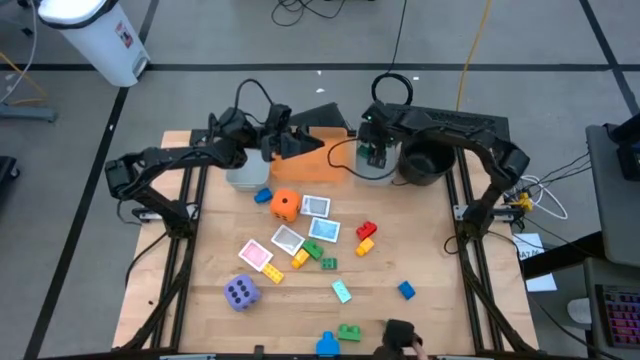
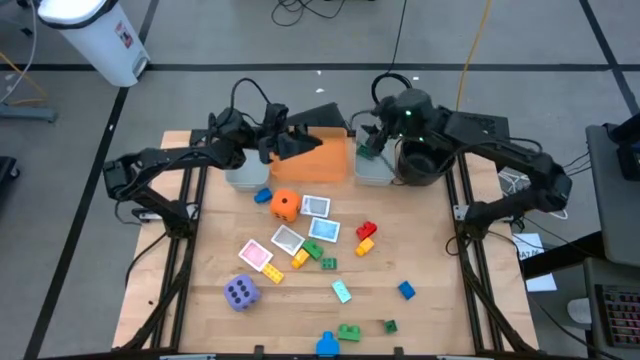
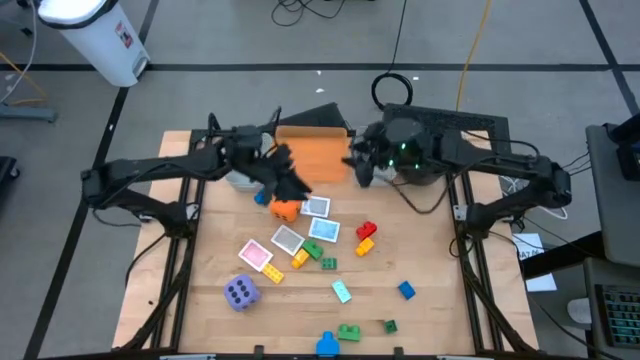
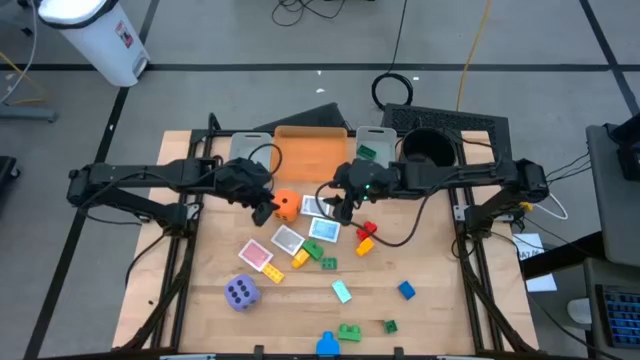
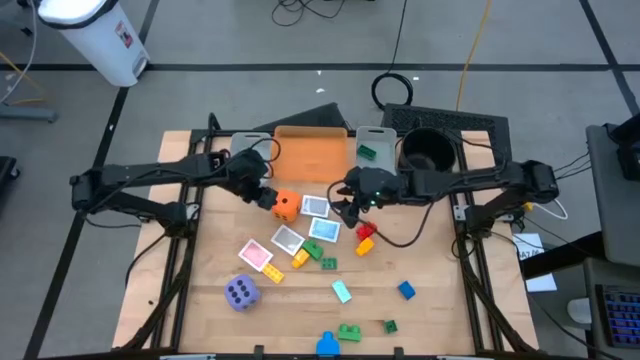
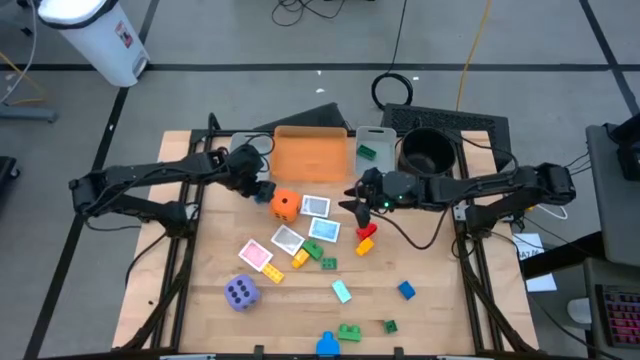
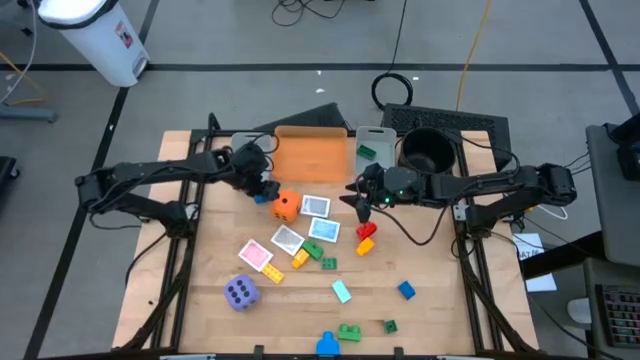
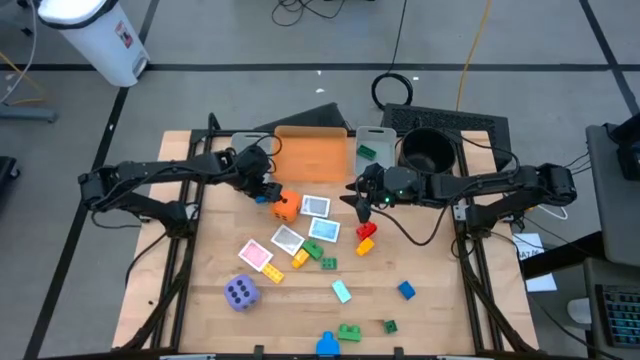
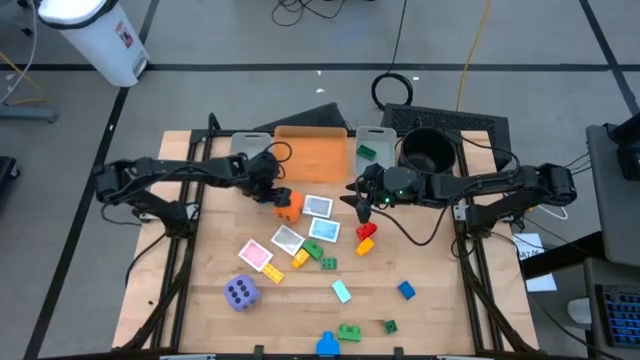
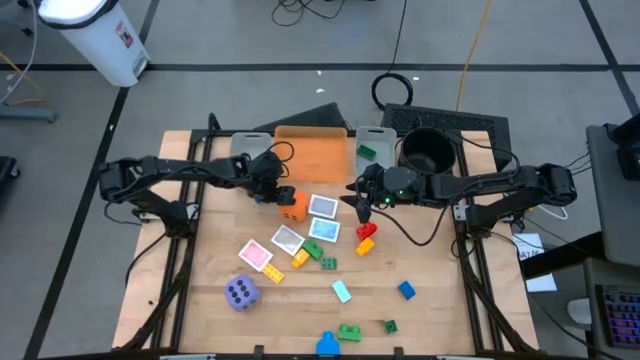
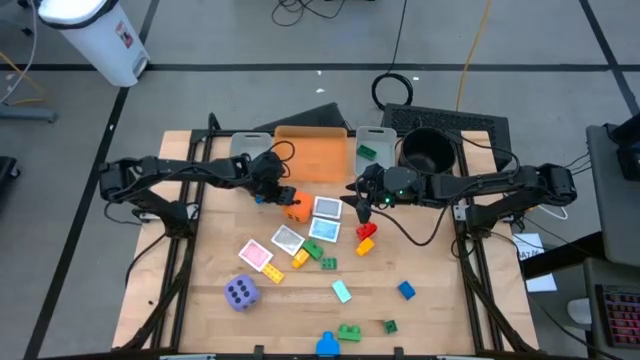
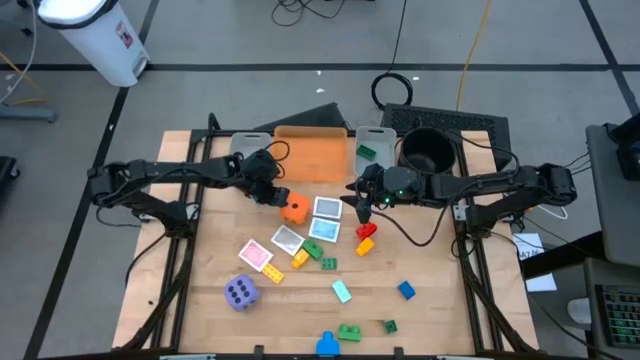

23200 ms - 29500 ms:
Task: Pick & Place Toys
Put the orange dice into the orange bin

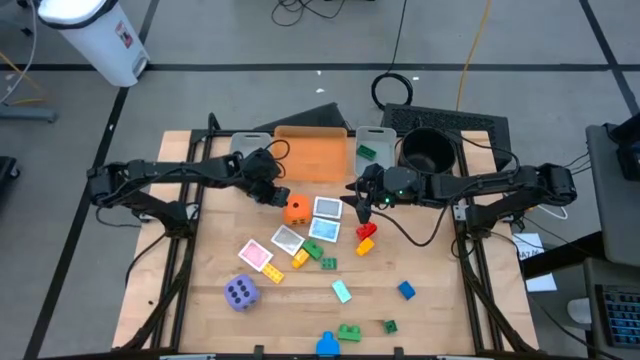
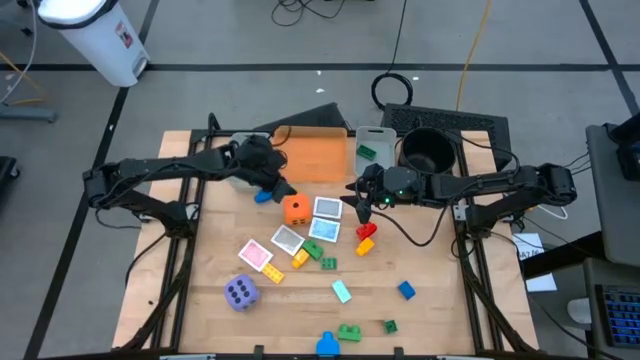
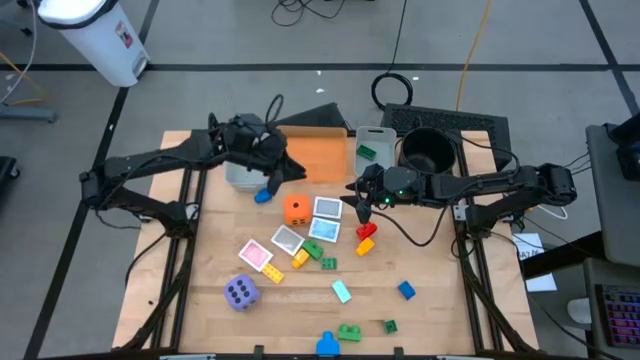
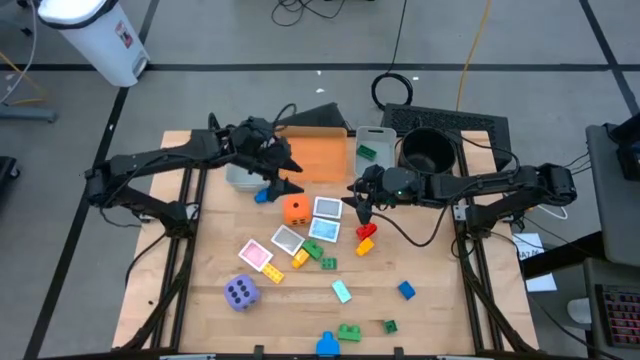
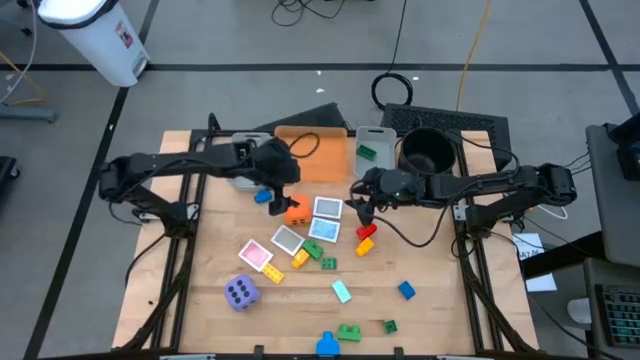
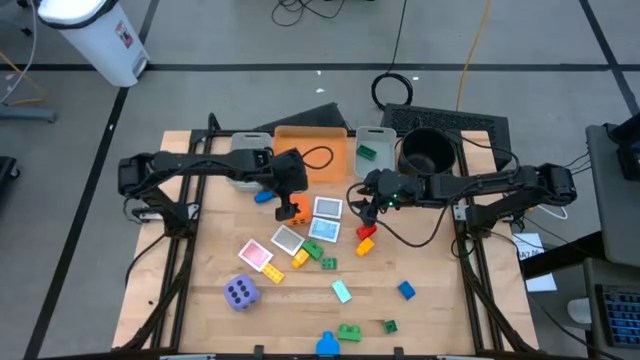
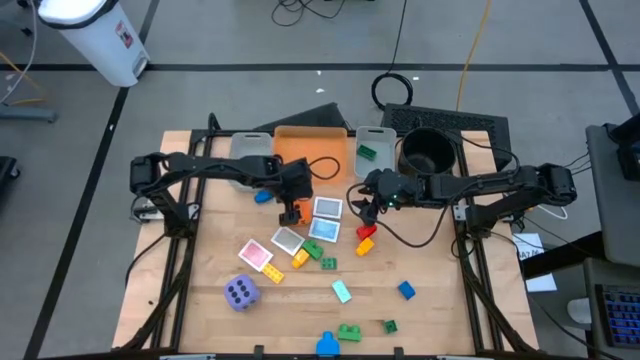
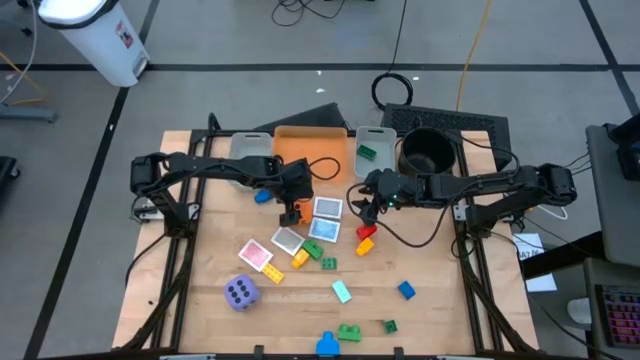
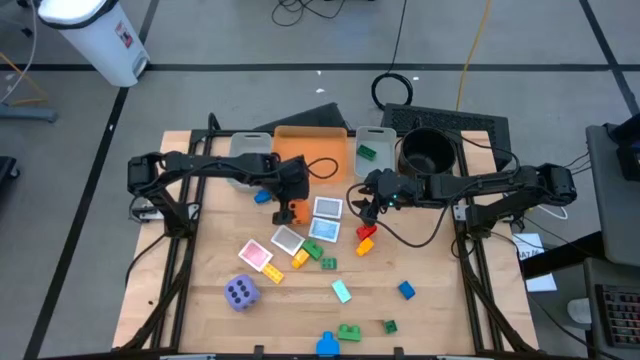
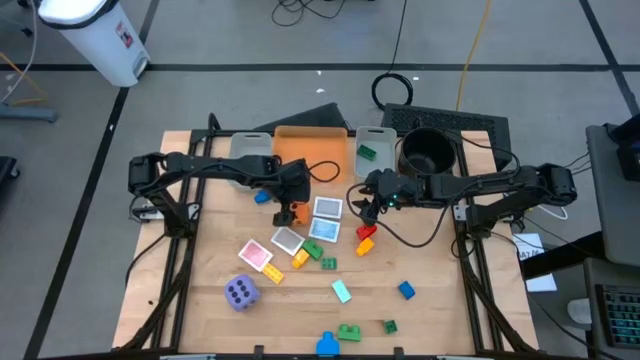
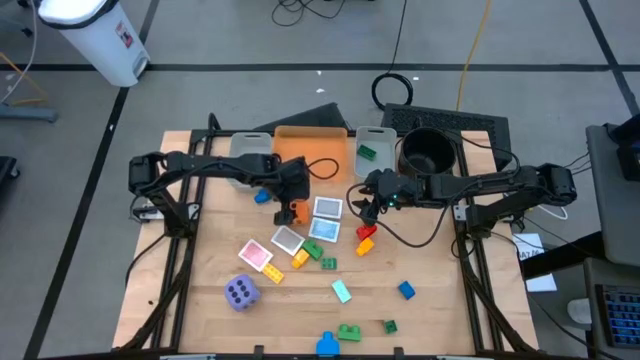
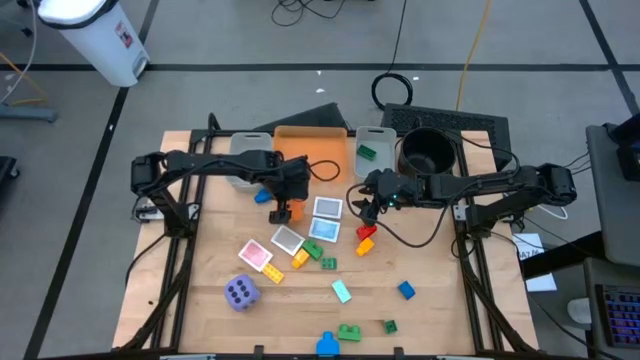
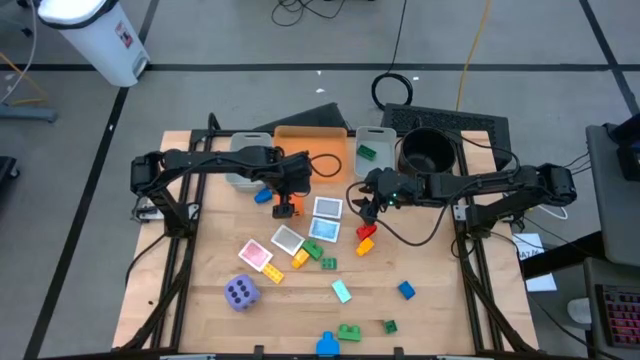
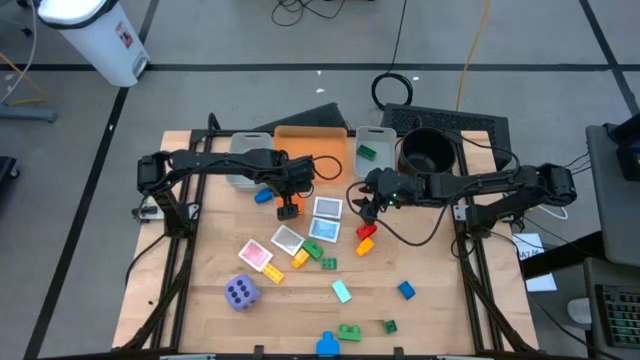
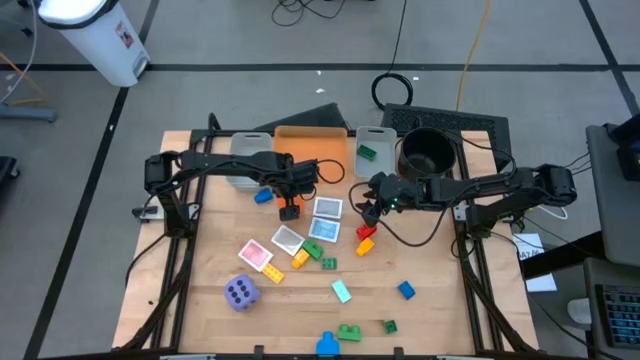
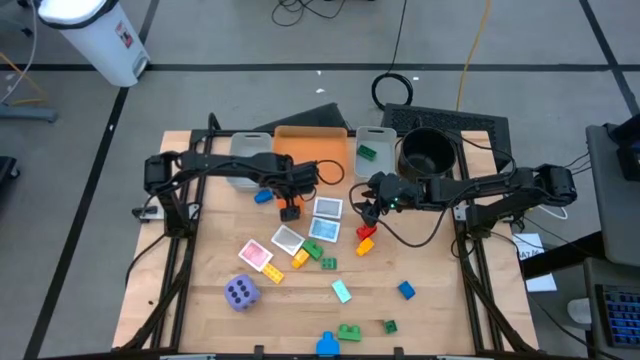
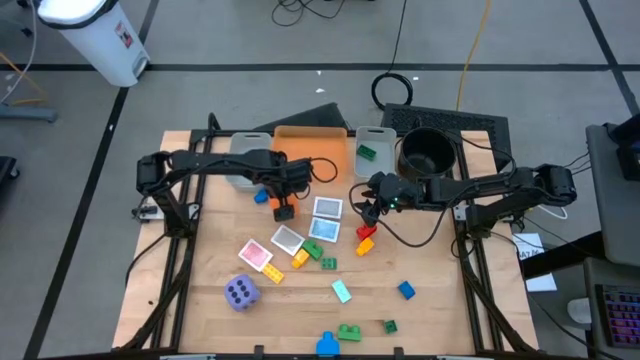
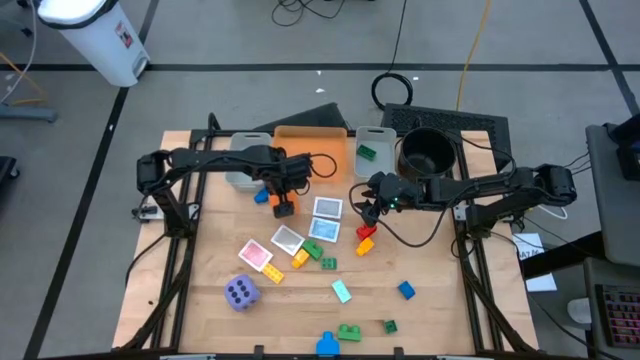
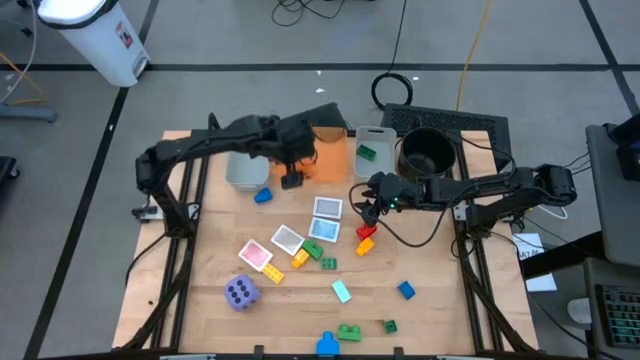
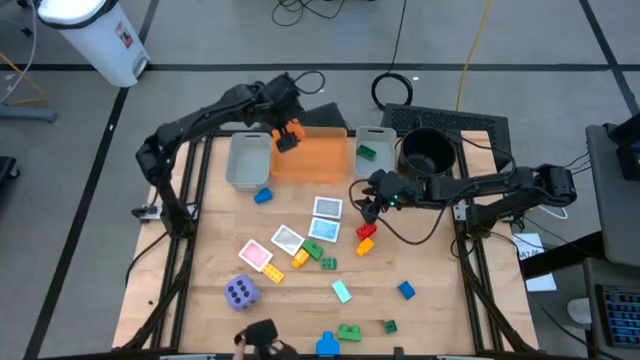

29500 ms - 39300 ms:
Put the orange dice into the orange bin

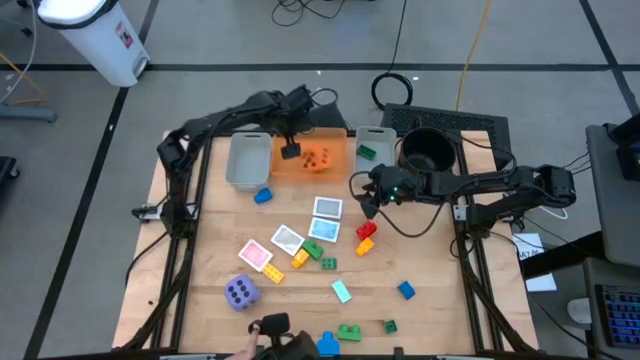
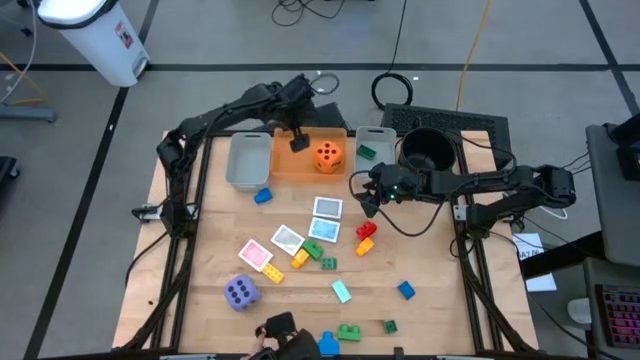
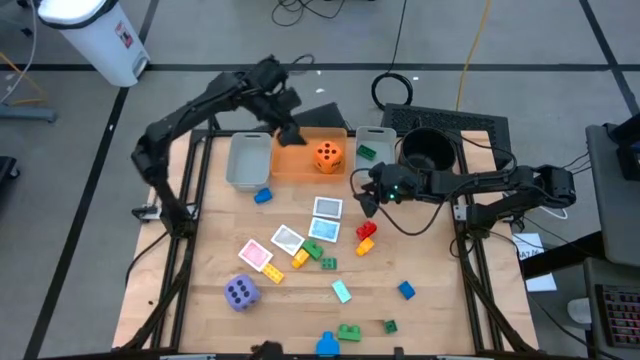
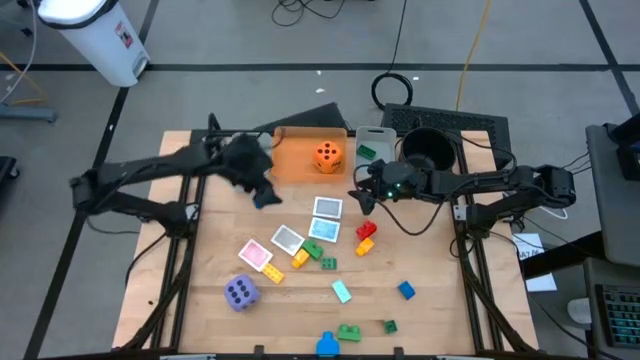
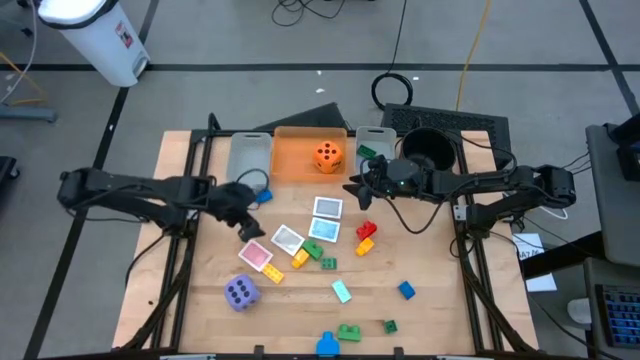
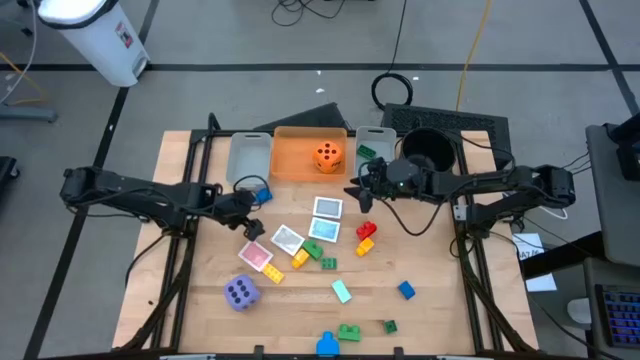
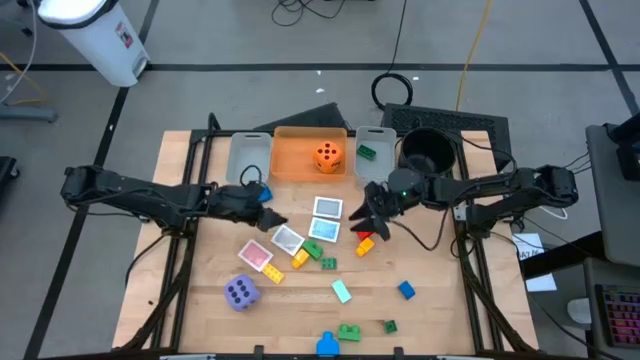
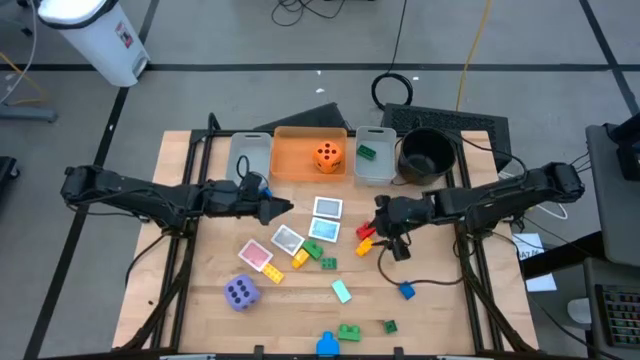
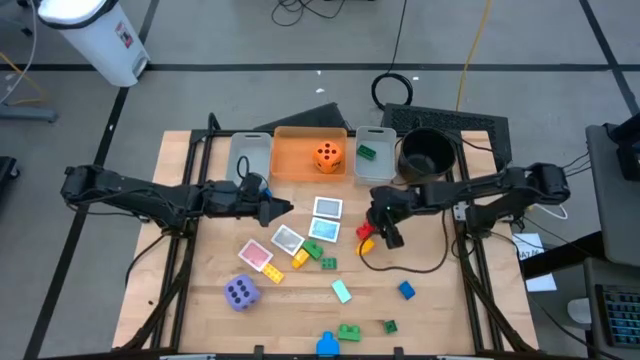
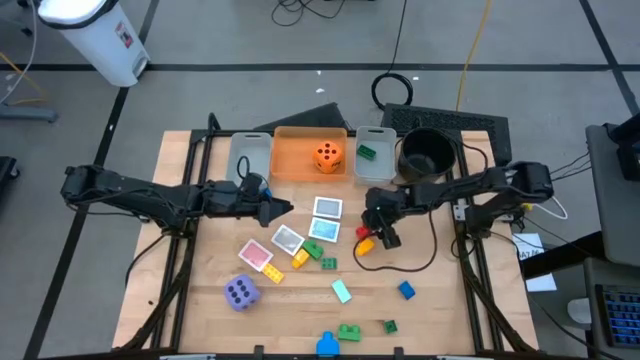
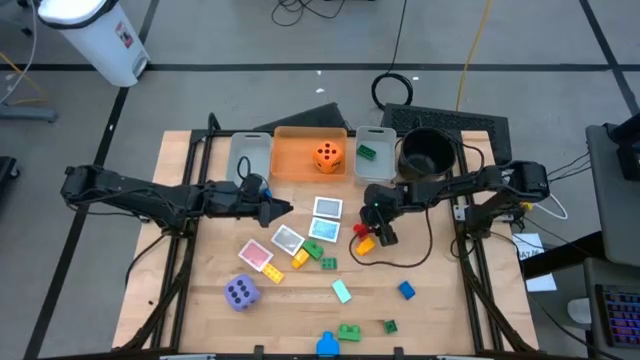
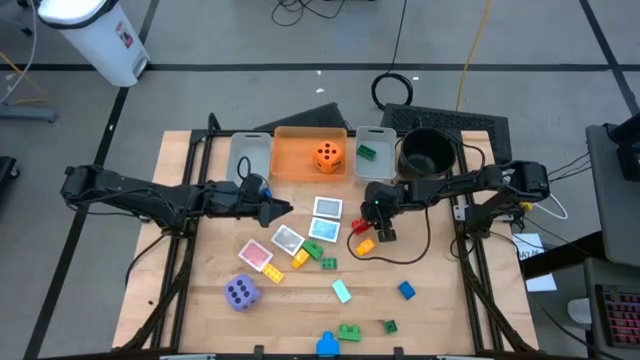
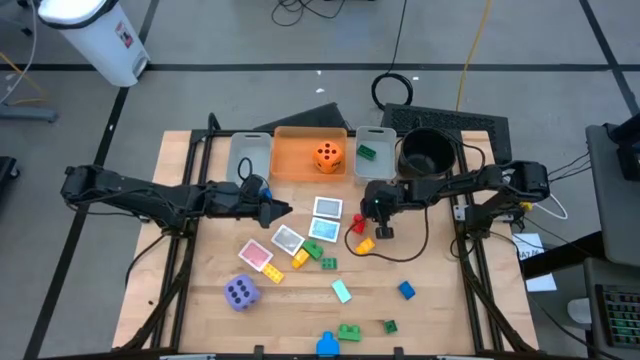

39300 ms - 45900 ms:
Put the red game piece into the right gray bin
